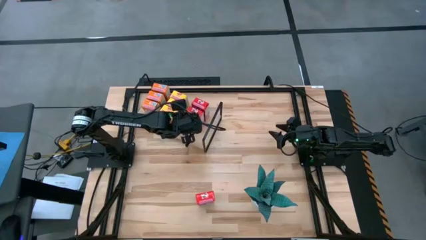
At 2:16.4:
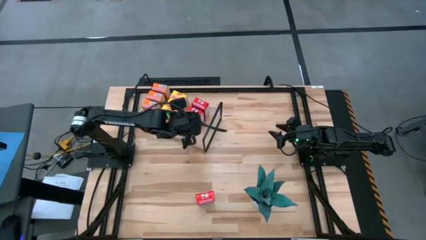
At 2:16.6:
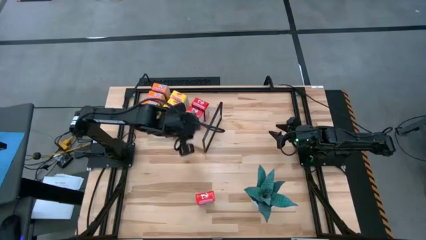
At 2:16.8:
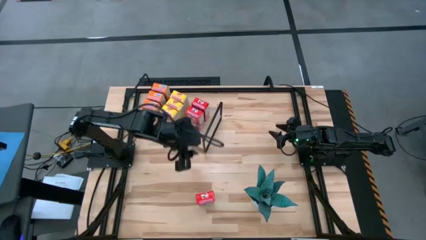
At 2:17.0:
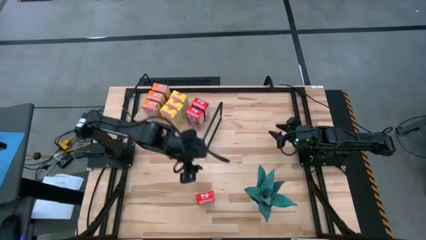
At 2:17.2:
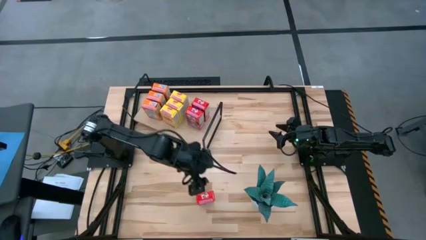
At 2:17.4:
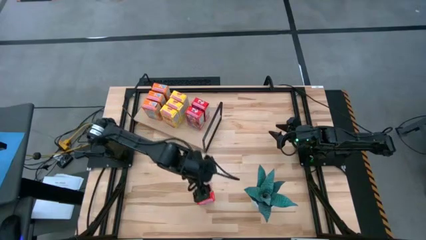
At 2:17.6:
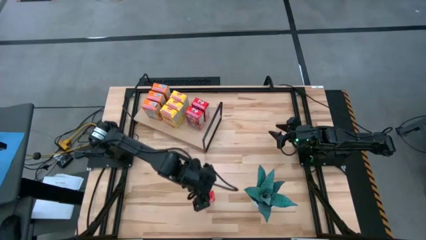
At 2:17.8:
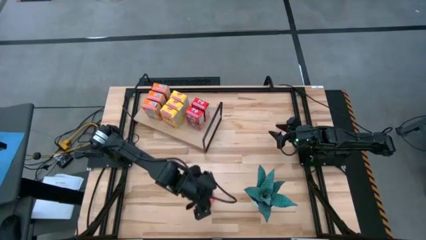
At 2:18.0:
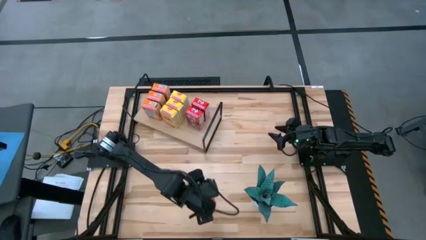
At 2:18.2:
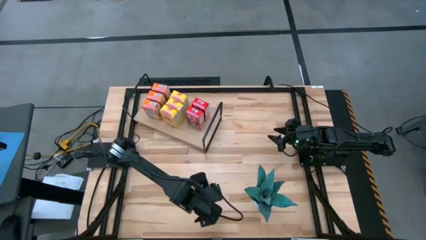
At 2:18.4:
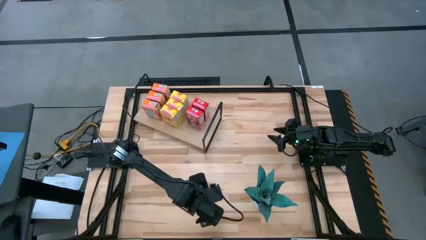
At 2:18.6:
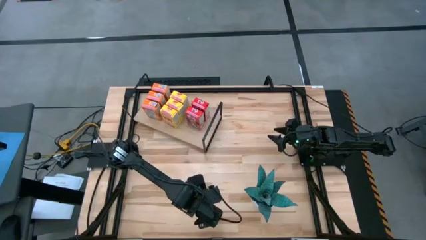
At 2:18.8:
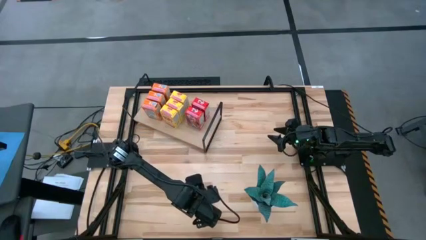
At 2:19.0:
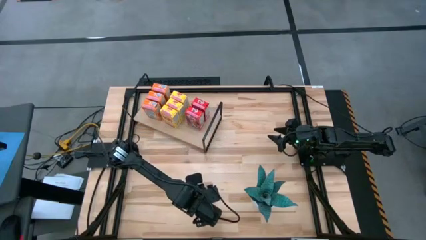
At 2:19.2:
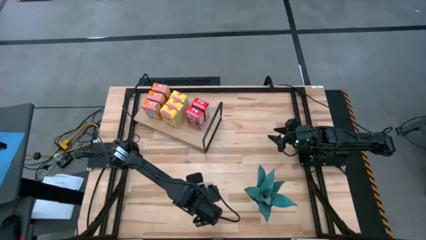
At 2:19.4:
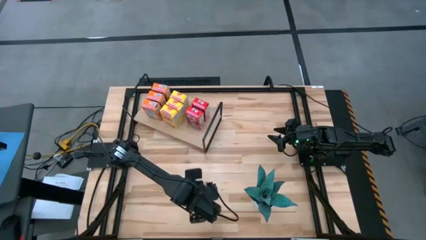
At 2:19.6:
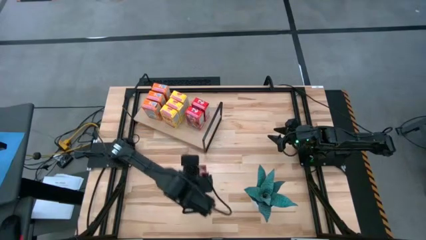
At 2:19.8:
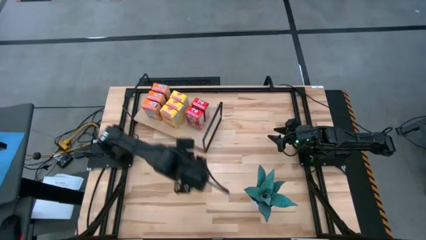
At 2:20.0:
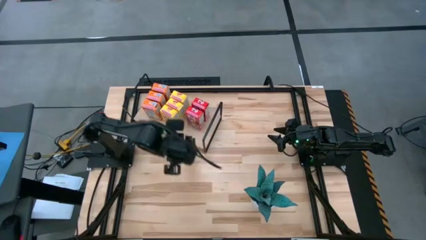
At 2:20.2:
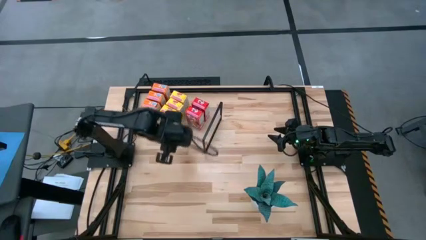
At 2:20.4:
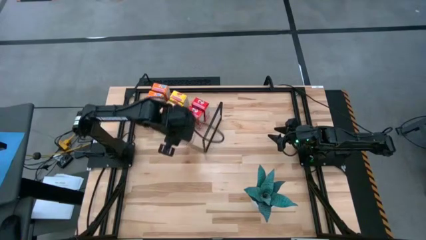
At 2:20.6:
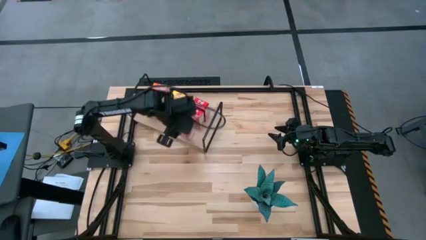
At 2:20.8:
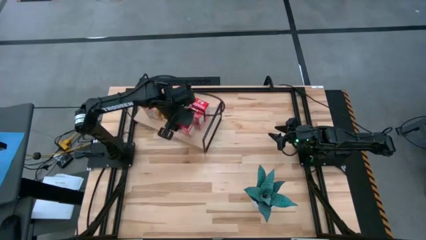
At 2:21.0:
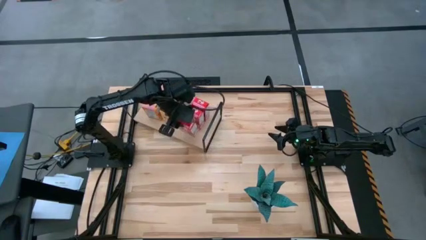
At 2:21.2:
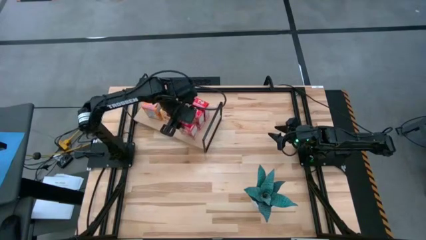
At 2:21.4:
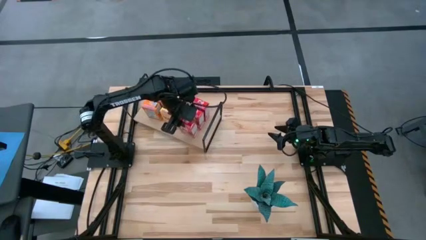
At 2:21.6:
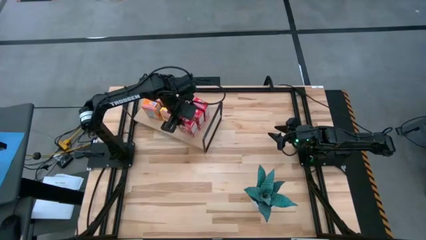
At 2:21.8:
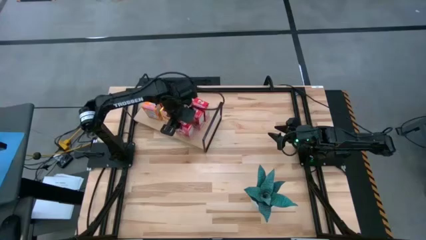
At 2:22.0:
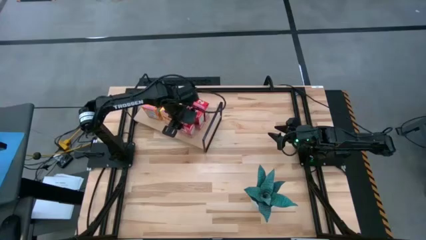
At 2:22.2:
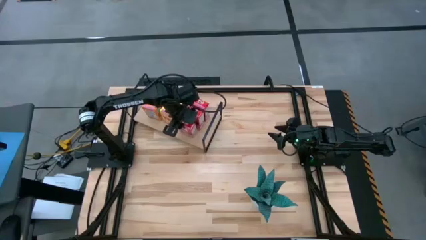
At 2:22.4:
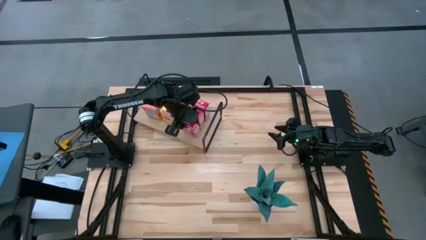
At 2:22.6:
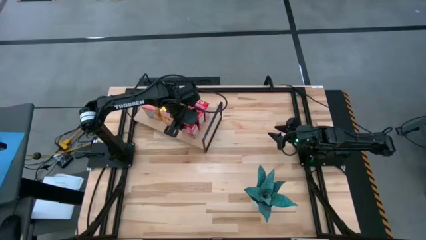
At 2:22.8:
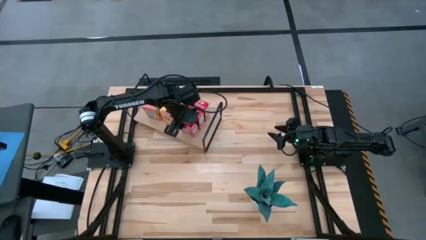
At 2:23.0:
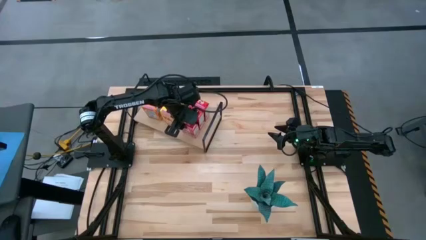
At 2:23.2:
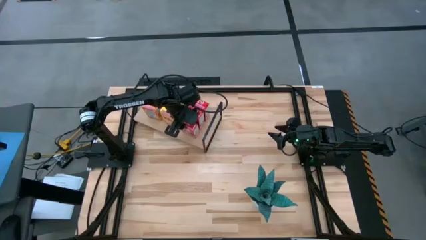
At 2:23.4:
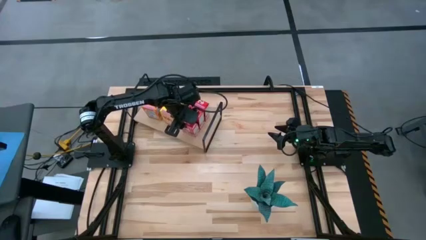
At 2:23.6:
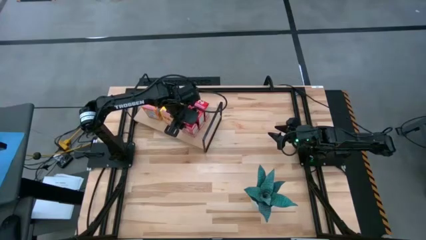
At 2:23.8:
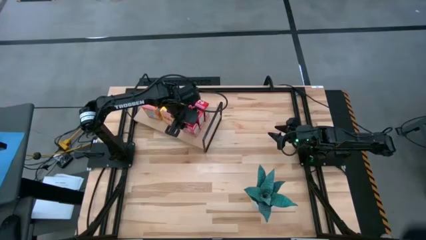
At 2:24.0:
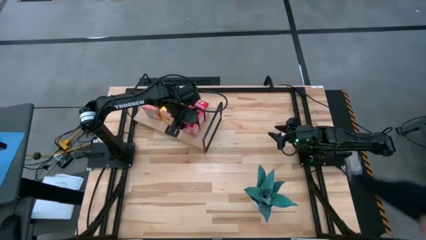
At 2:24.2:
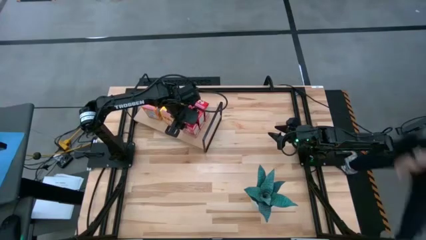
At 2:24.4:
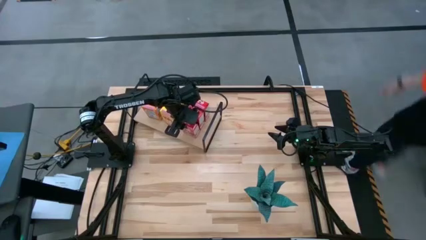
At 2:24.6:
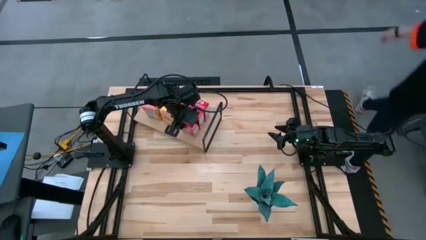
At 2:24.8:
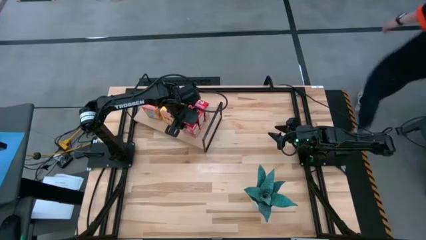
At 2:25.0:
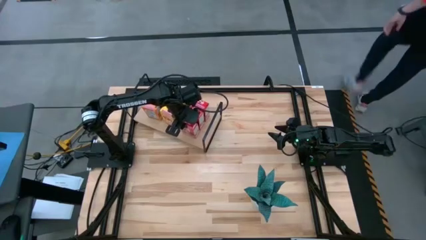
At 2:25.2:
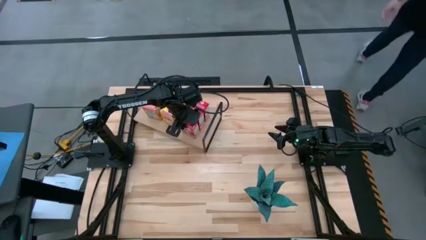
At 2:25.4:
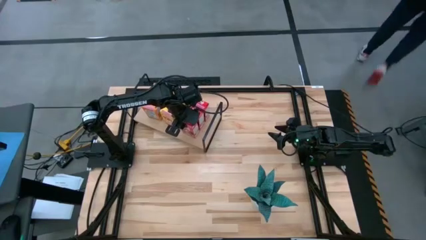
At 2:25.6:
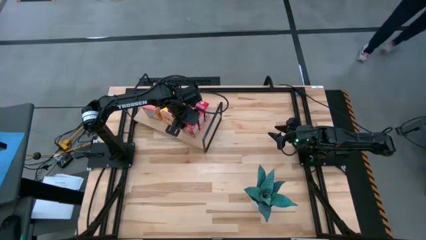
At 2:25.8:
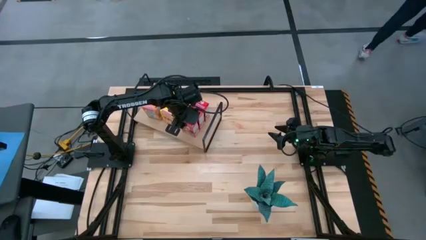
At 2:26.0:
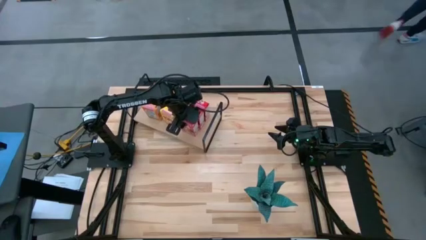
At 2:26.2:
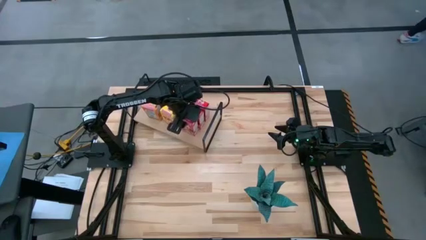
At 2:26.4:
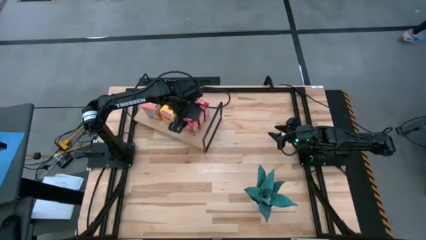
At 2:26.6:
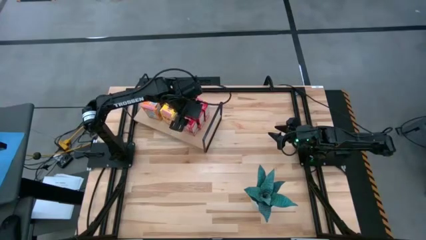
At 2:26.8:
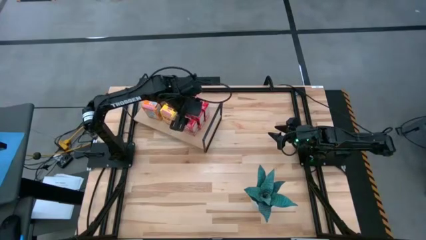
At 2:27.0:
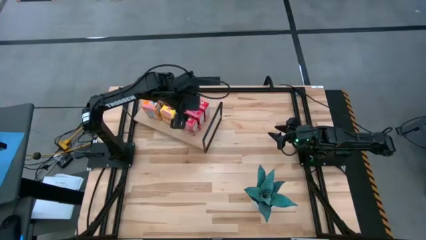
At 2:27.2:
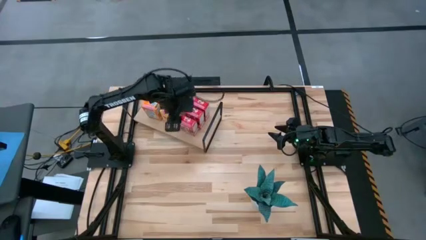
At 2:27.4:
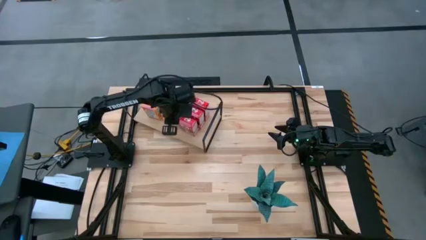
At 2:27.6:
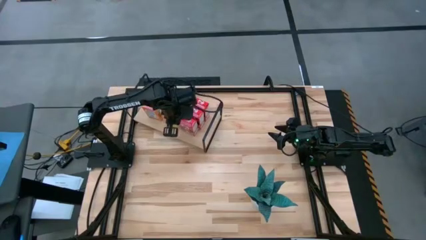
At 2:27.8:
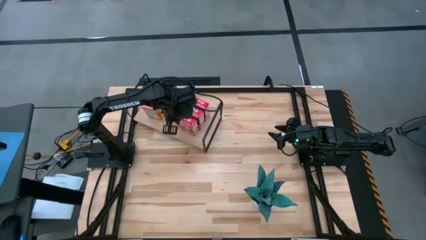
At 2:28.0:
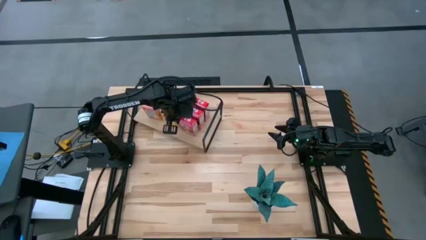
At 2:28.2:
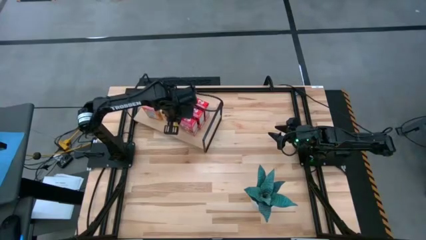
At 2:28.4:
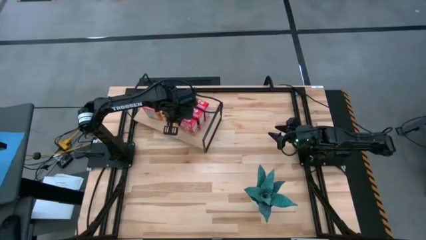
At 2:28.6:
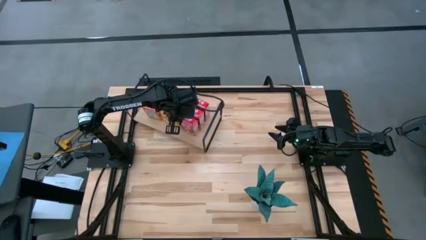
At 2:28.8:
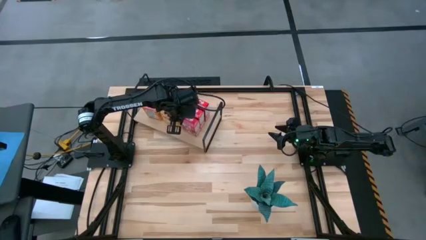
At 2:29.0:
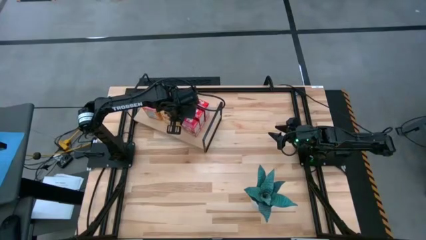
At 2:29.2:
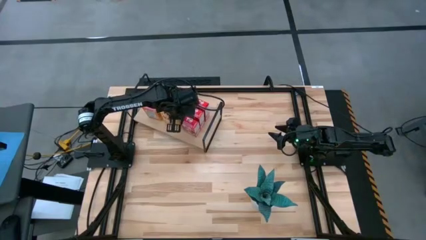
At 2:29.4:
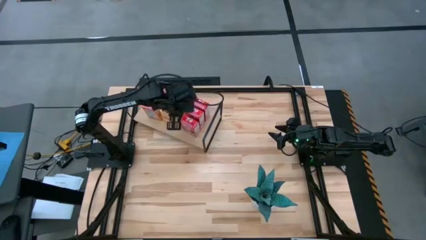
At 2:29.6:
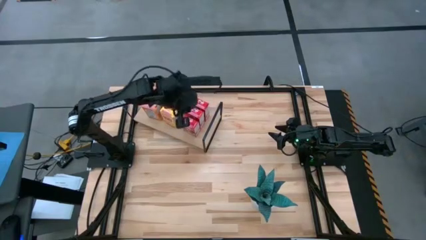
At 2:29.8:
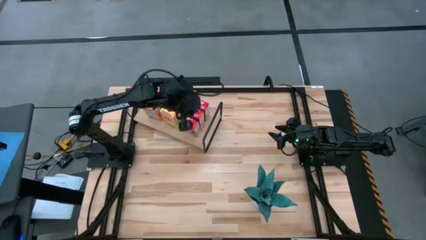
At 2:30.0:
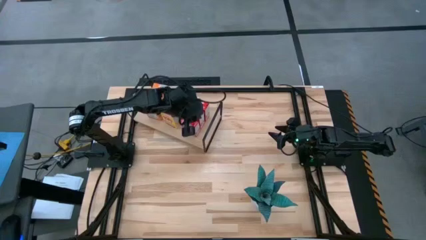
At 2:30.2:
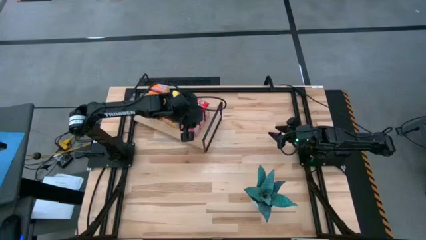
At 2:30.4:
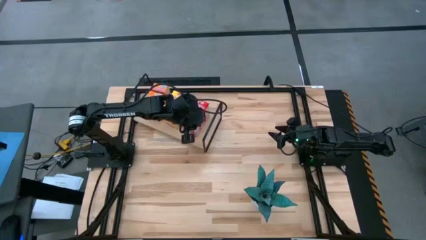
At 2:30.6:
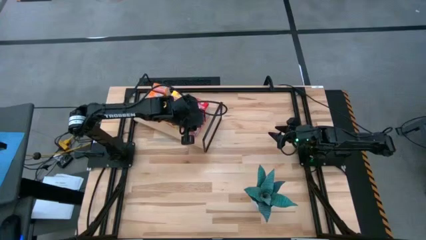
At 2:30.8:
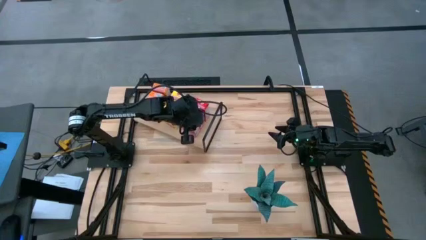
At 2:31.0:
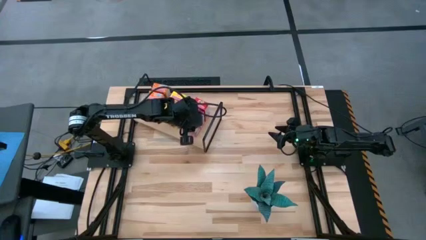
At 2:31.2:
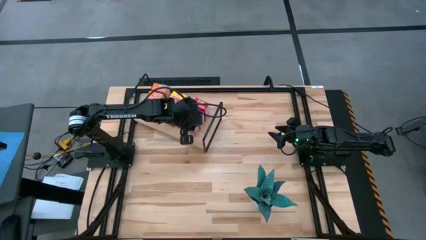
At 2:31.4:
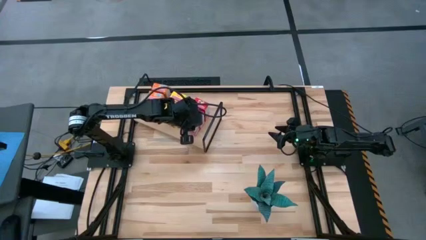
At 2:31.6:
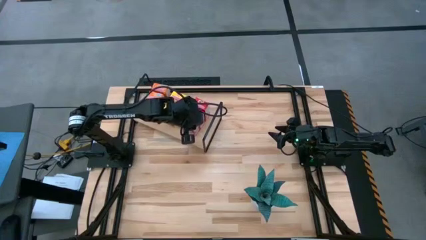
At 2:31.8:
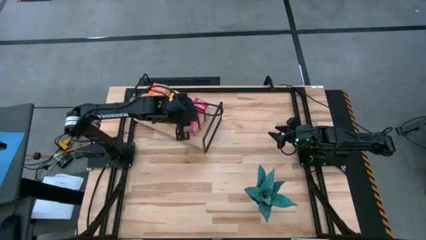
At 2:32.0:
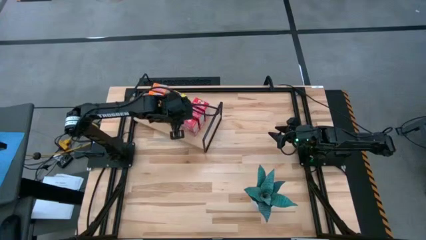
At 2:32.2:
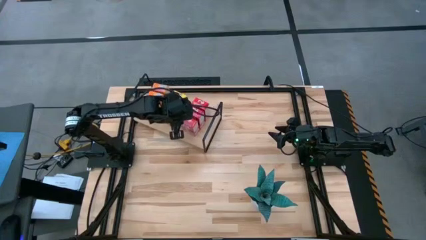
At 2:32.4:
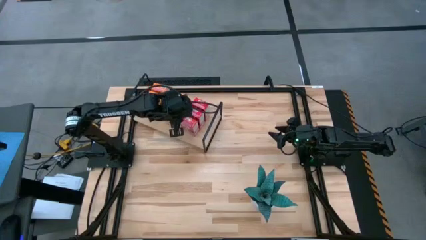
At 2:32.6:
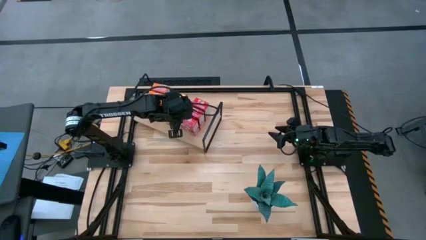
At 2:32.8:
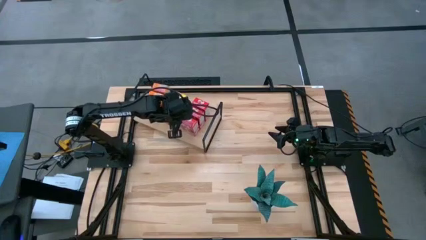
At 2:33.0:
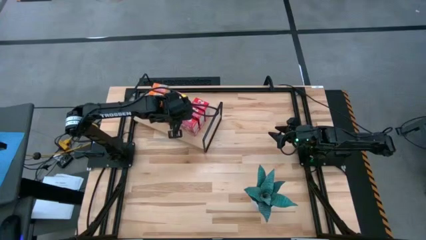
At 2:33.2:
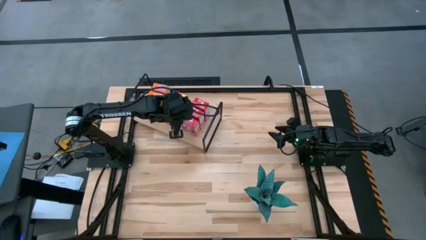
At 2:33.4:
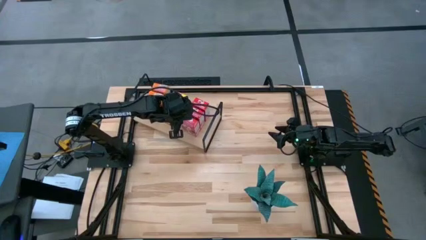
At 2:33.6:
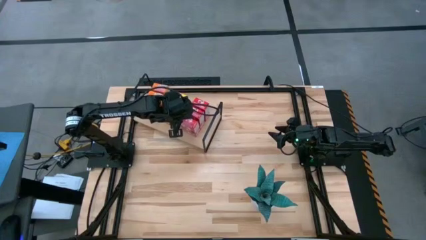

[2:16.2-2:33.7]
Task: Stack cereal on shelf
Put the red cereal box aligned with the other red cereal boxes on the shelf
